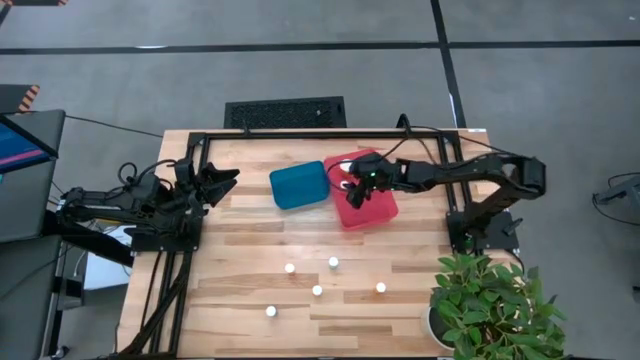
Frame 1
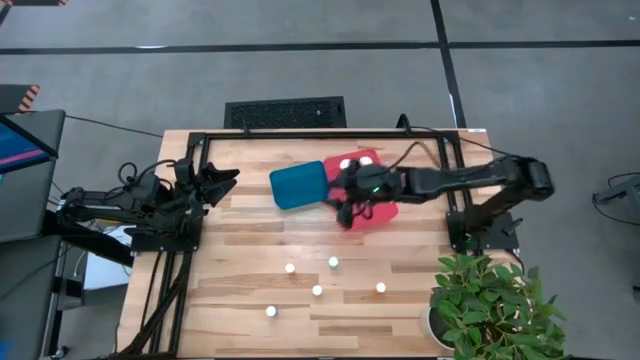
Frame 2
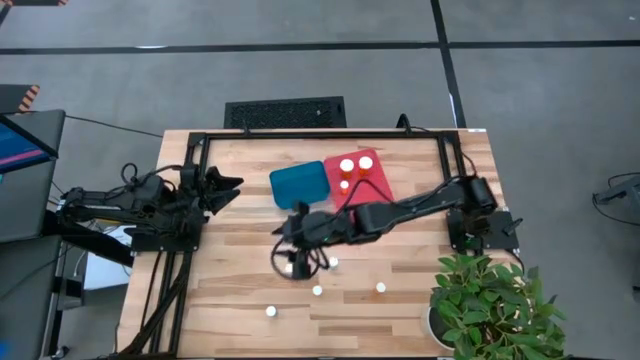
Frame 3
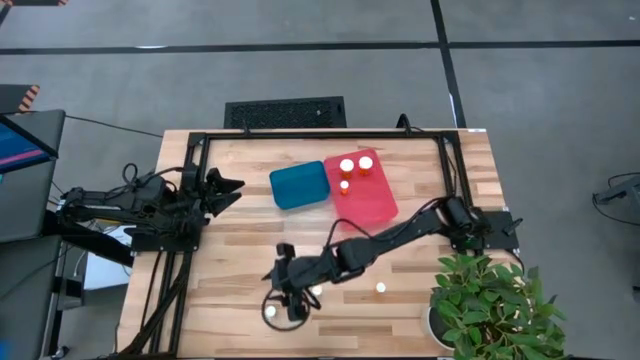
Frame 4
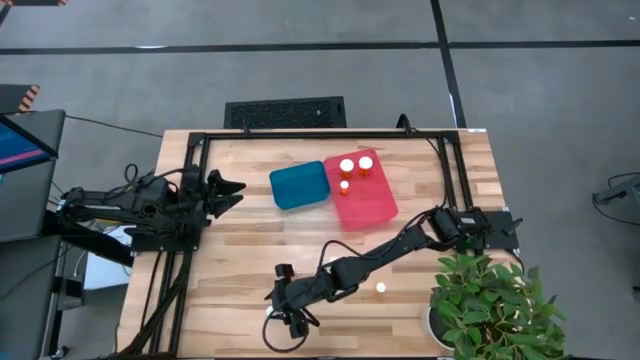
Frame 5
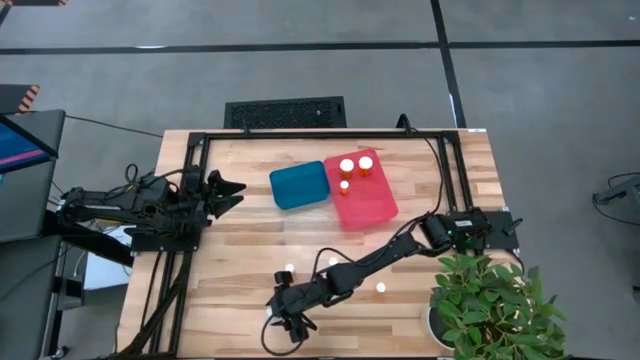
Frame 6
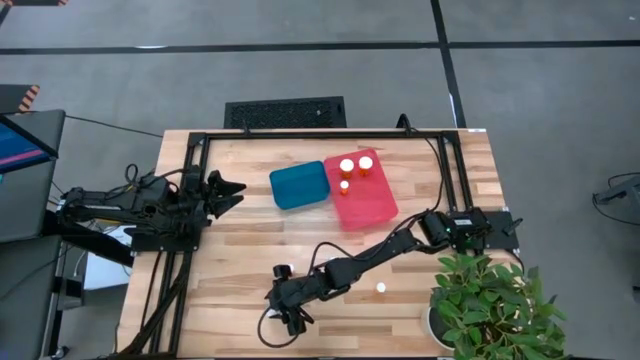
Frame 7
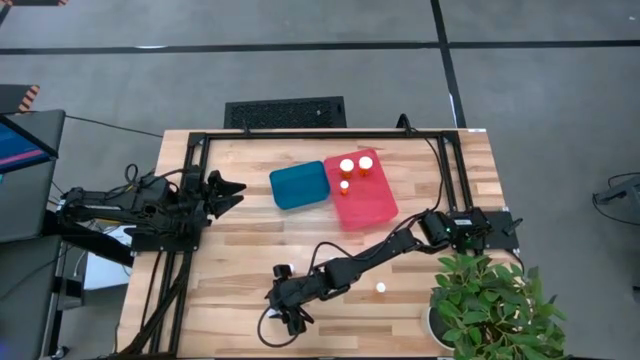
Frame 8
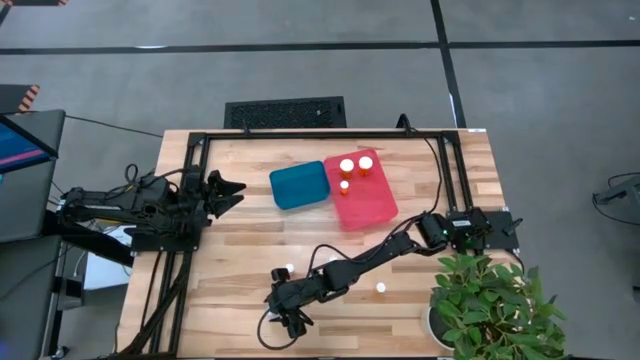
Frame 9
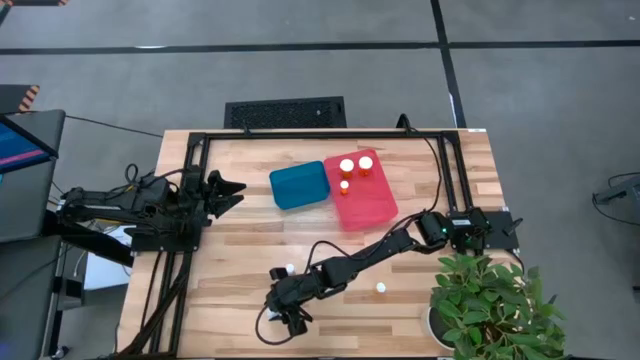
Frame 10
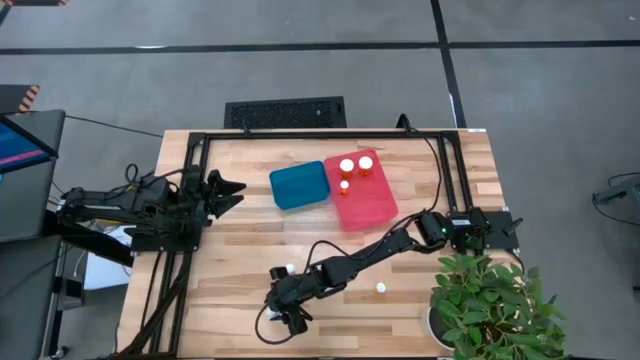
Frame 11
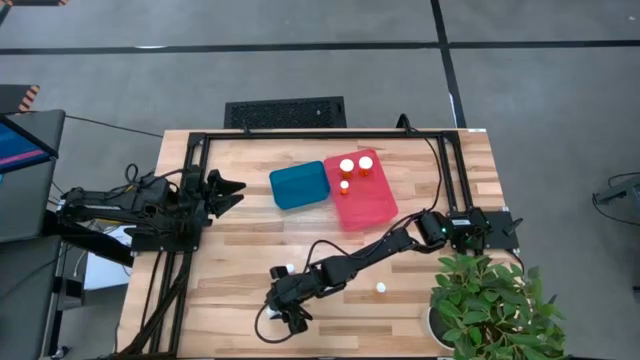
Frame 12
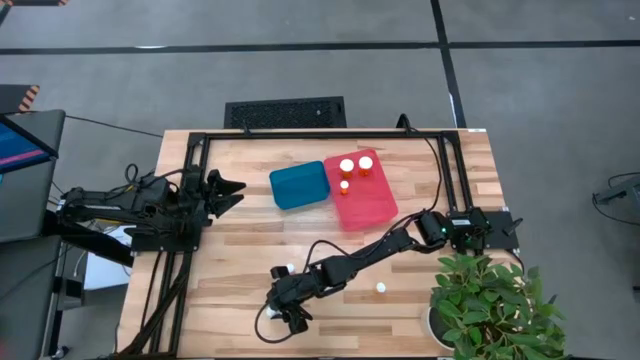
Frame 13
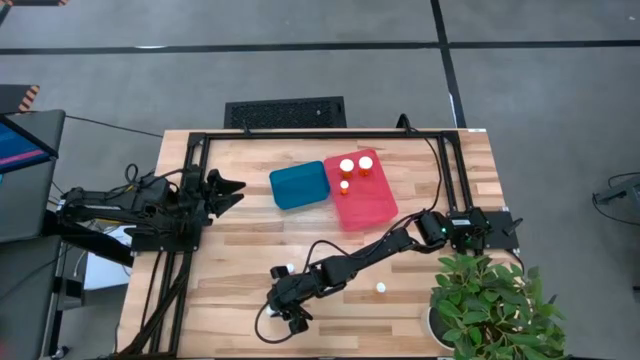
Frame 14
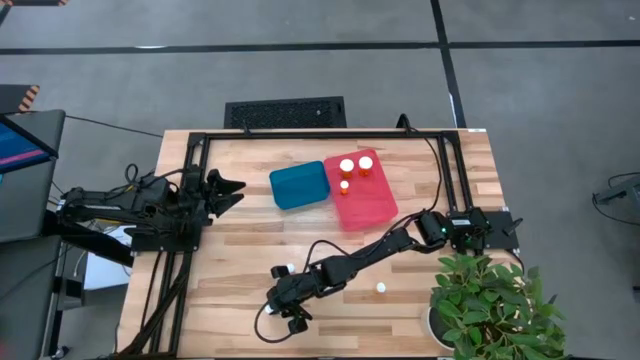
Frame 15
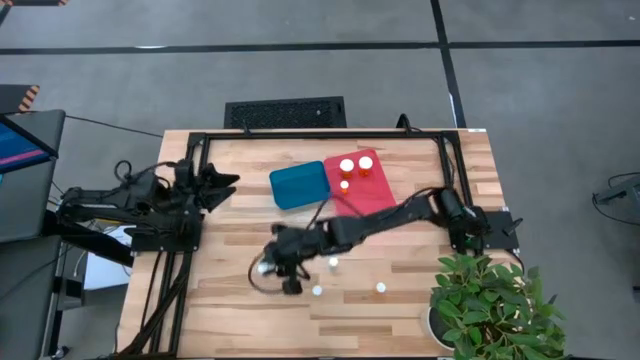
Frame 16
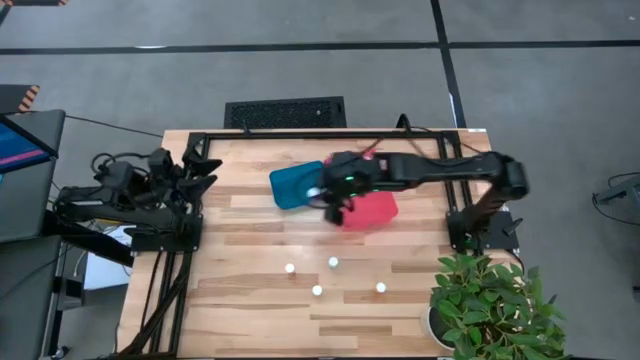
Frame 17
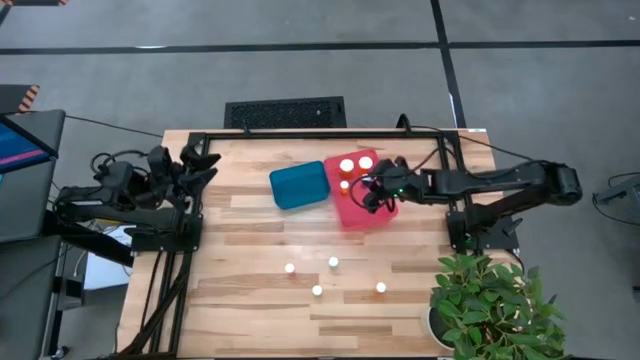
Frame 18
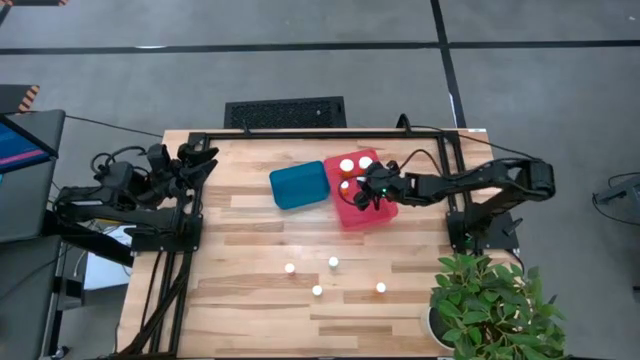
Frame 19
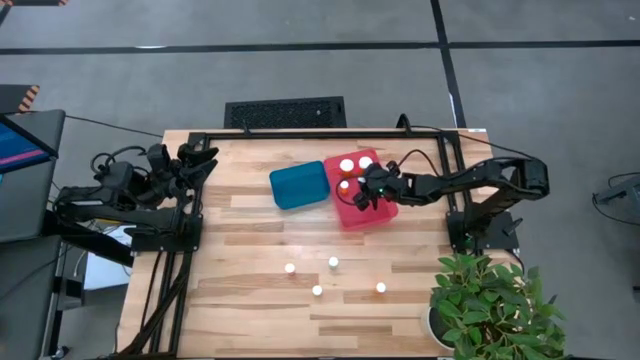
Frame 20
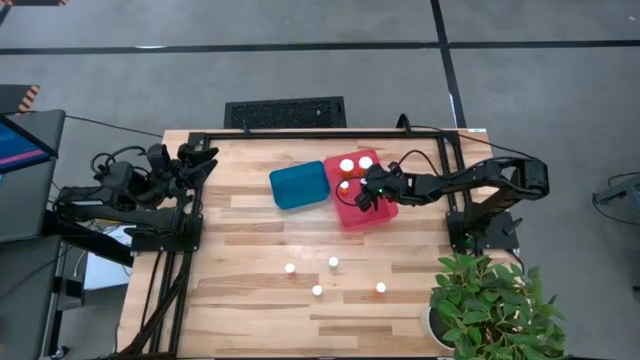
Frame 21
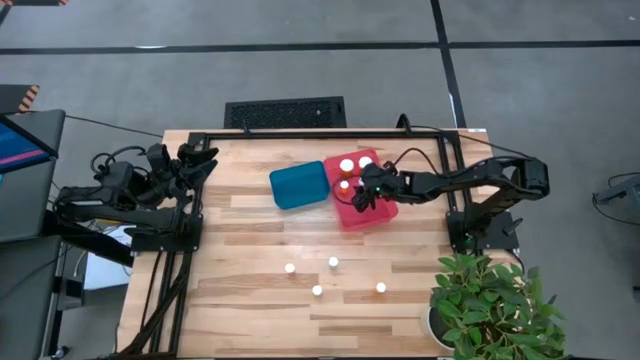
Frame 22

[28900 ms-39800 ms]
Task: Pick and place medicine bottles into bin by pill shape (circle, oval)
Put the left blue pill bottle into the red bin

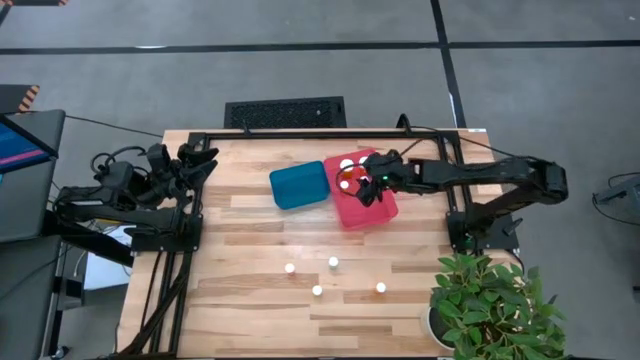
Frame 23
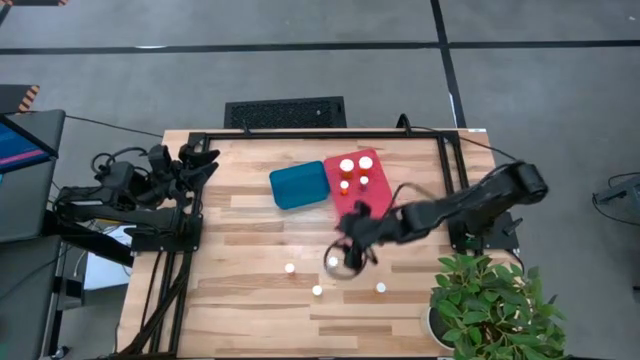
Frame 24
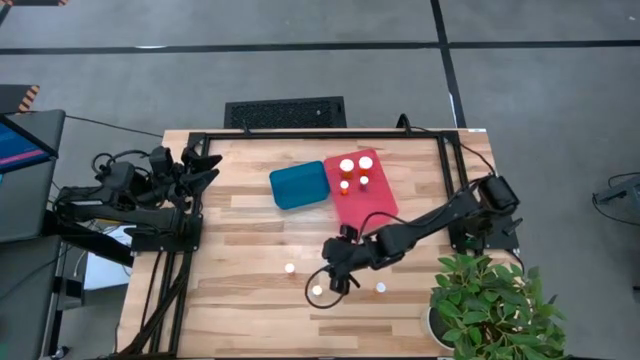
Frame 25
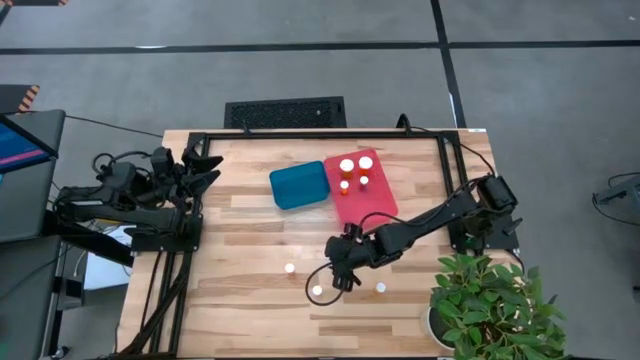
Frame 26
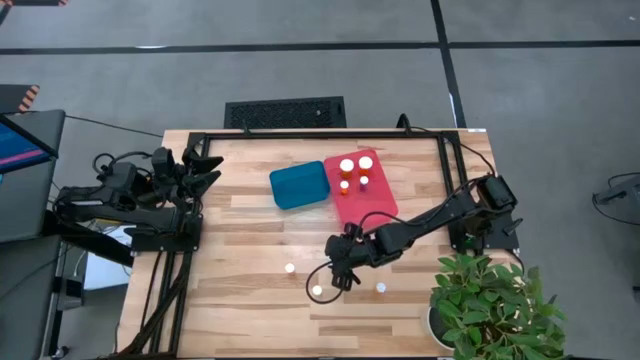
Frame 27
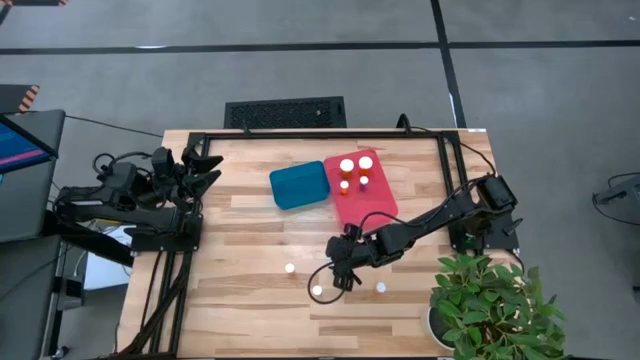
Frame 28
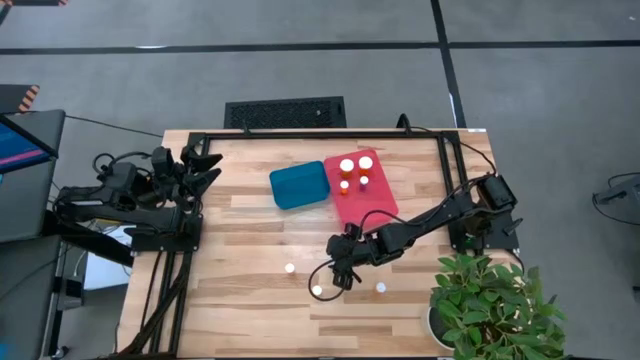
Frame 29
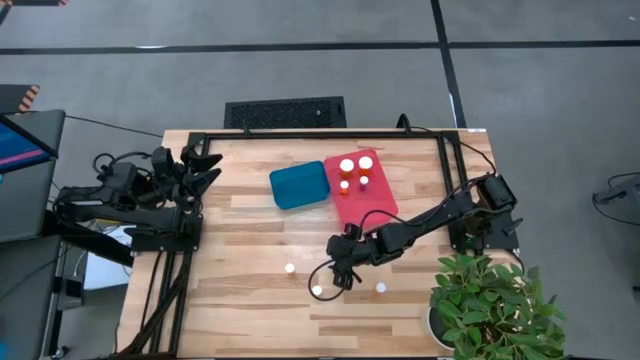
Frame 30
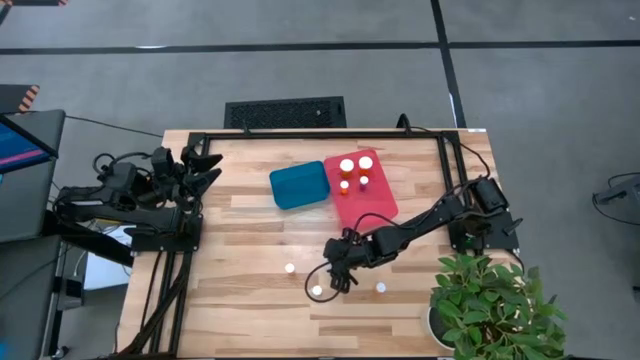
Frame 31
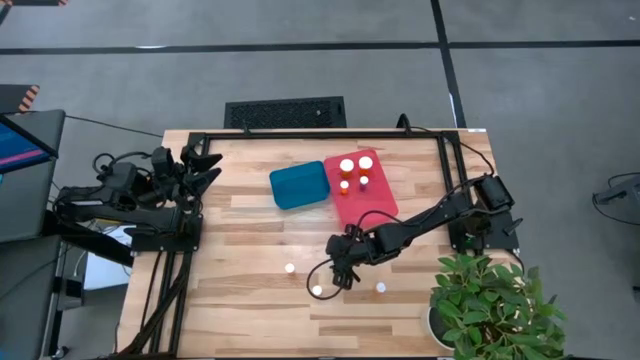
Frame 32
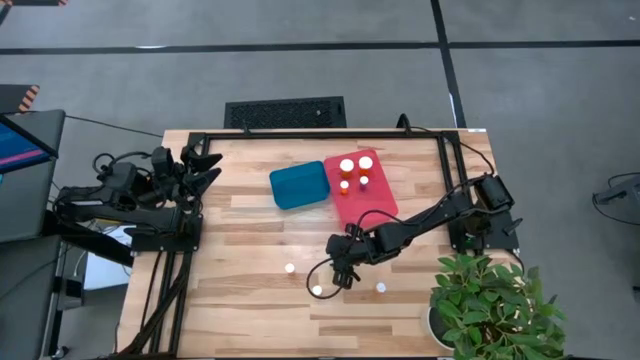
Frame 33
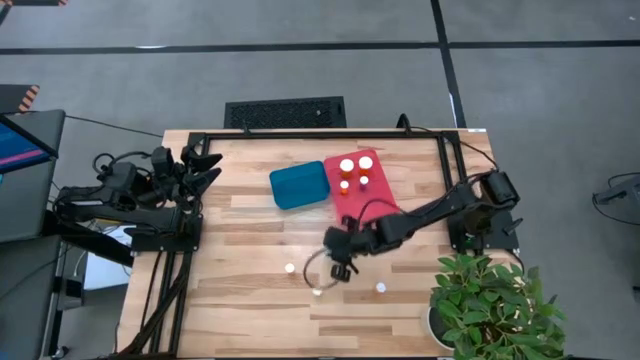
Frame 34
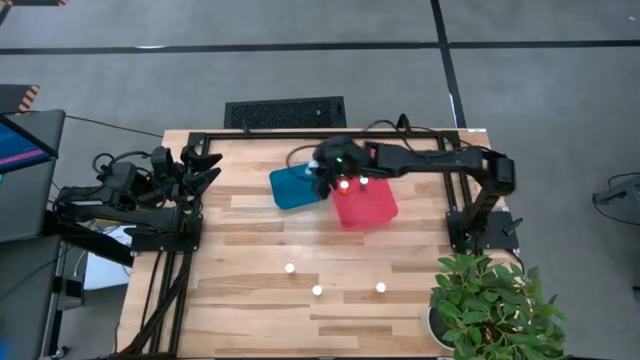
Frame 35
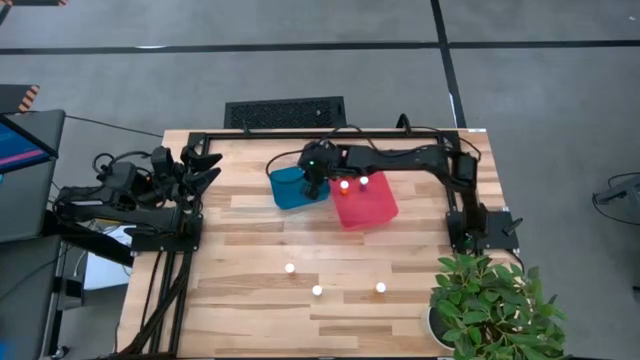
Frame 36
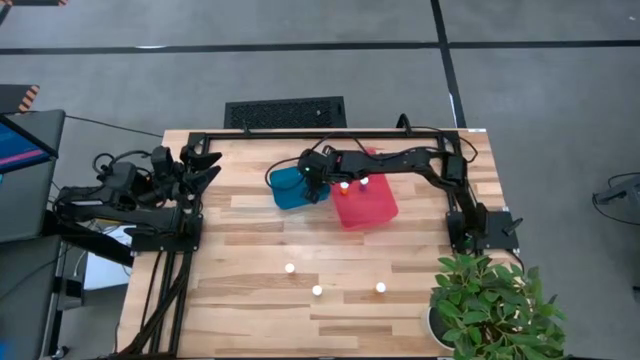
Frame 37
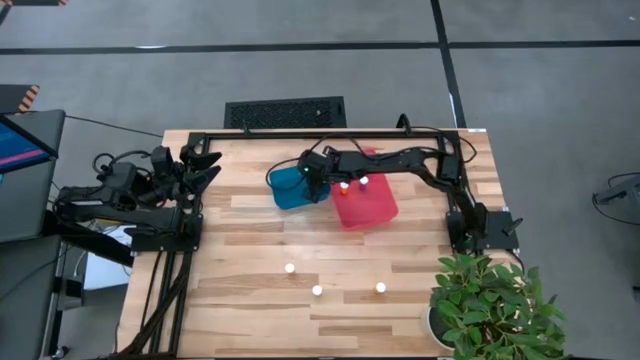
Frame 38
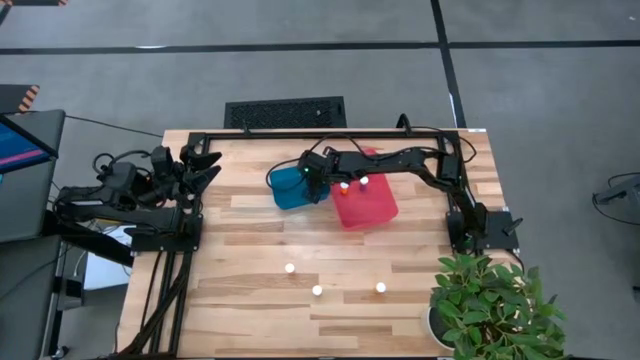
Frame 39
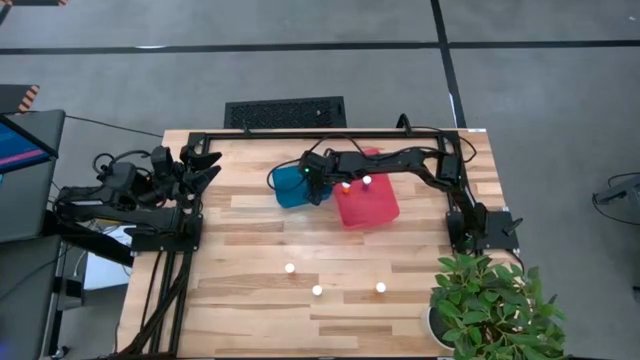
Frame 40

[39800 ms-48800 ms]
Put the blue pill bottle into the blue bin

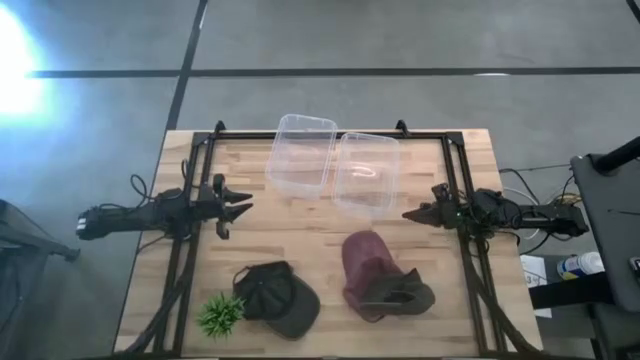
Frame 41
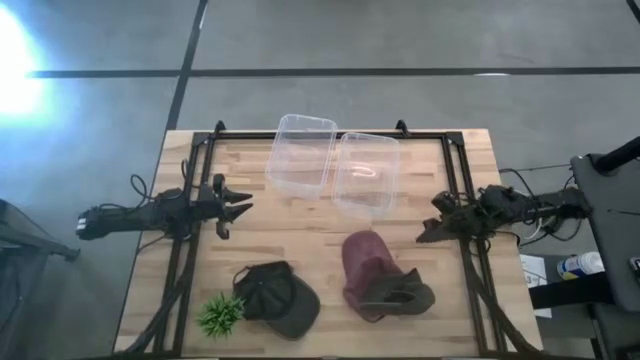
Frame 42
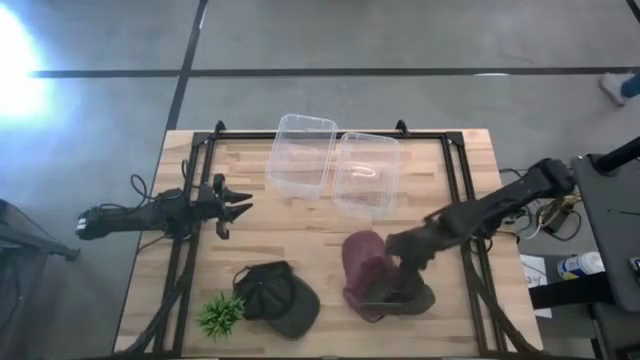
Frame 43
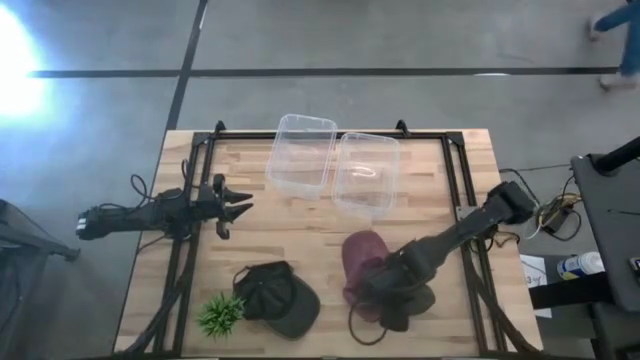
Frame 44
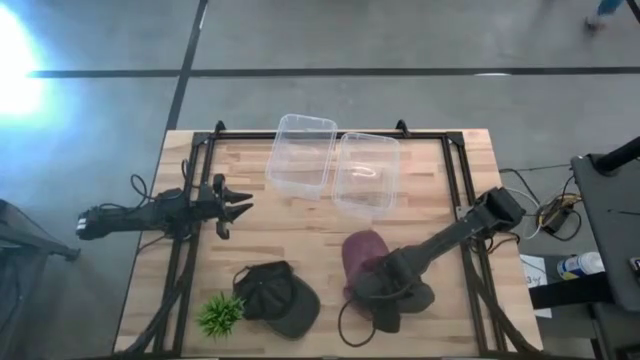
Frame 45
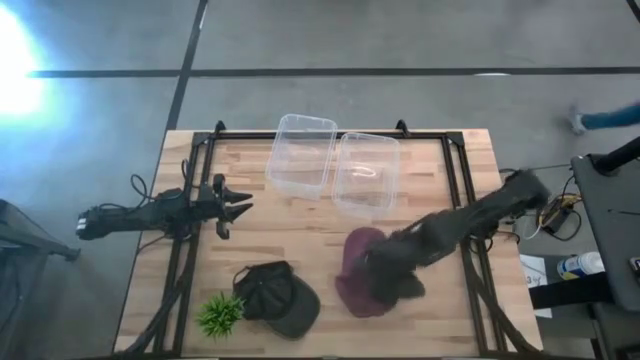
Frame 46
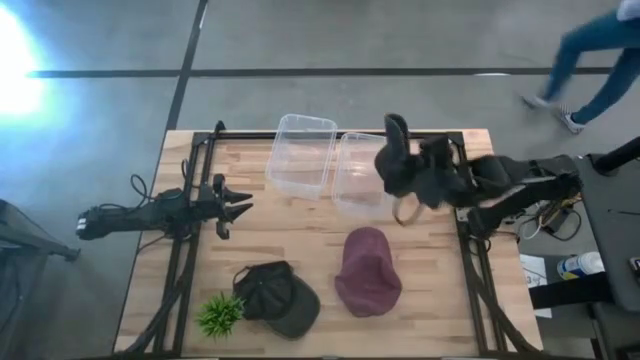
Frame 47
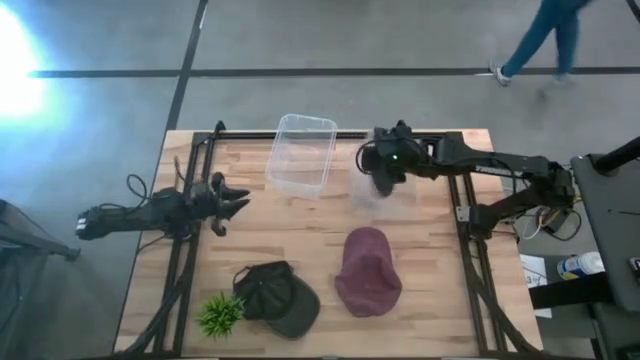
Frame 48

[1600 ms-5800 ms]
Task: Pick & Place hat
Put the right black cap into the right transparent bin
